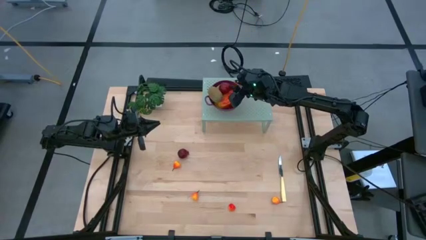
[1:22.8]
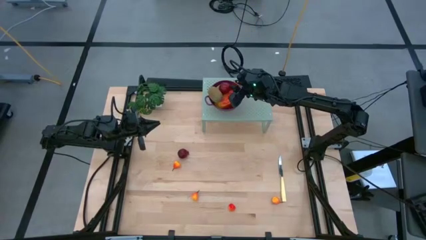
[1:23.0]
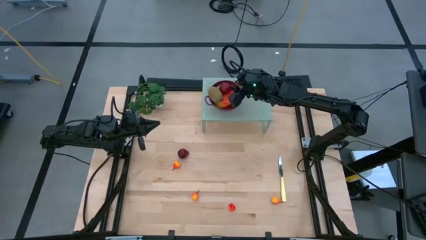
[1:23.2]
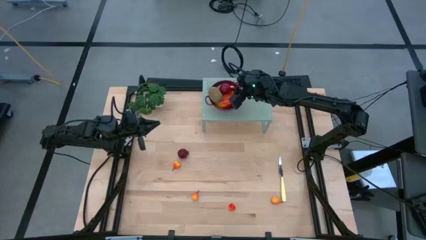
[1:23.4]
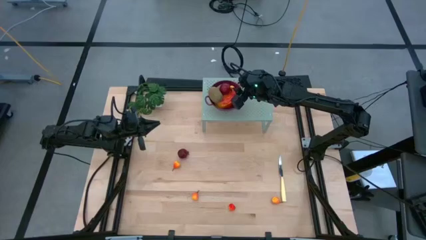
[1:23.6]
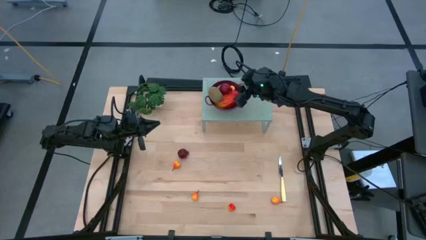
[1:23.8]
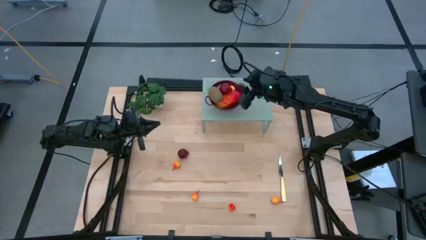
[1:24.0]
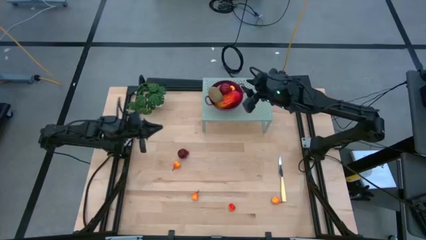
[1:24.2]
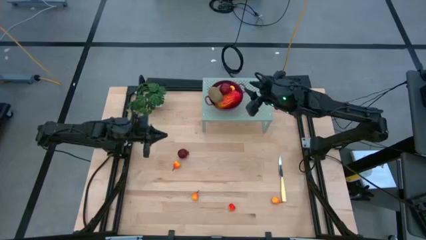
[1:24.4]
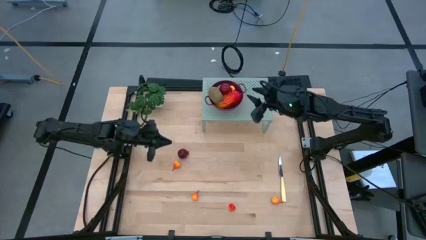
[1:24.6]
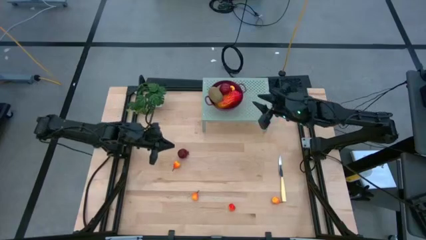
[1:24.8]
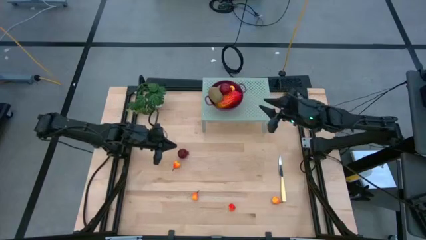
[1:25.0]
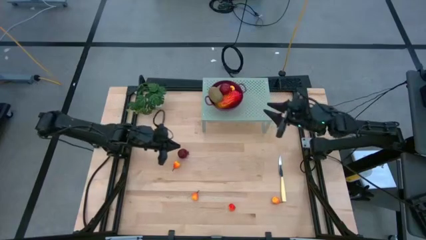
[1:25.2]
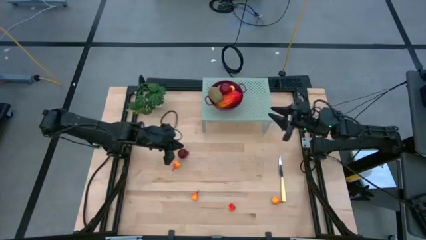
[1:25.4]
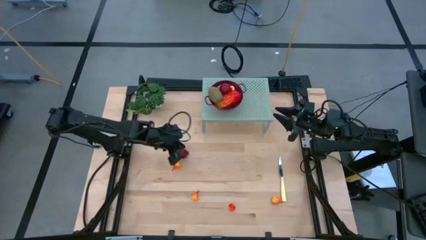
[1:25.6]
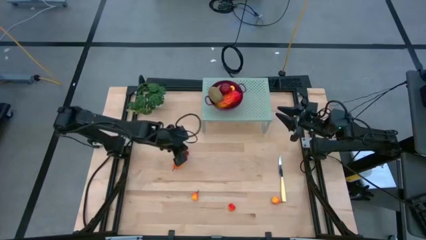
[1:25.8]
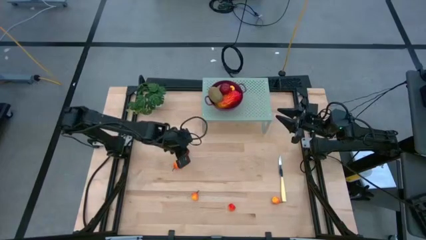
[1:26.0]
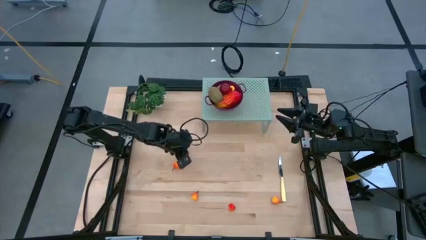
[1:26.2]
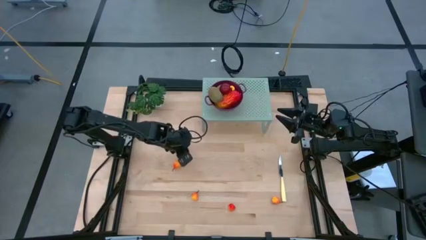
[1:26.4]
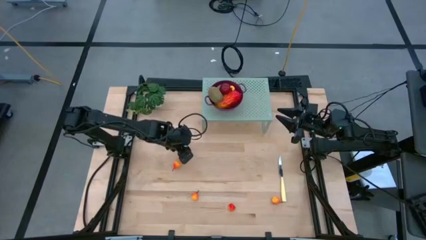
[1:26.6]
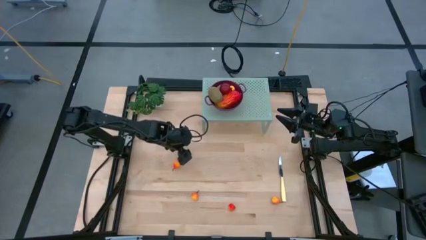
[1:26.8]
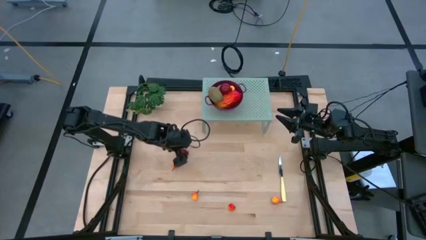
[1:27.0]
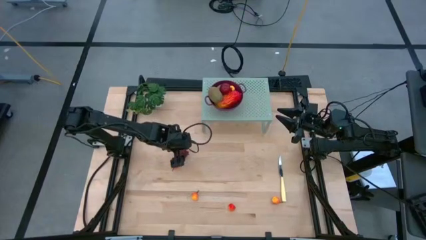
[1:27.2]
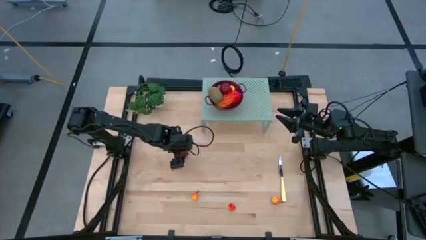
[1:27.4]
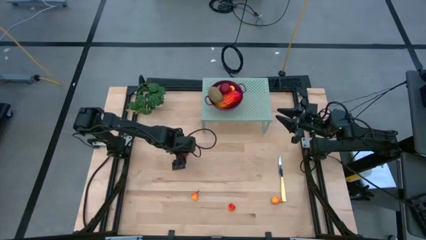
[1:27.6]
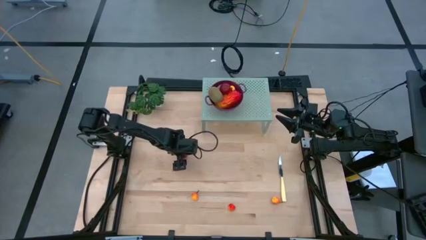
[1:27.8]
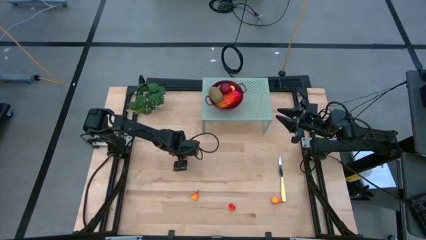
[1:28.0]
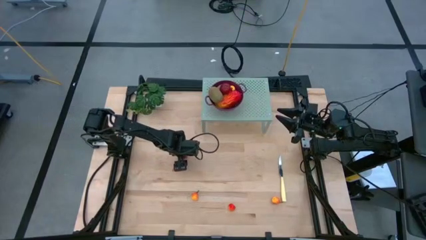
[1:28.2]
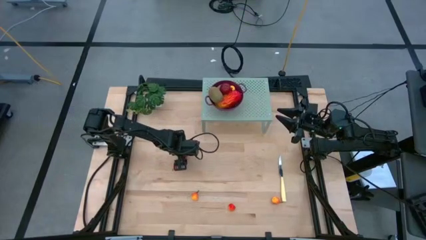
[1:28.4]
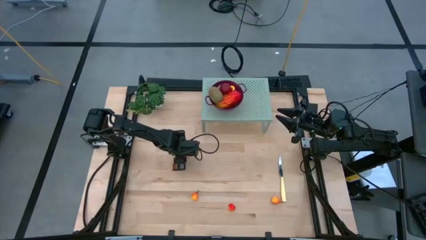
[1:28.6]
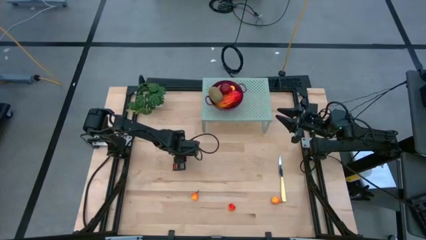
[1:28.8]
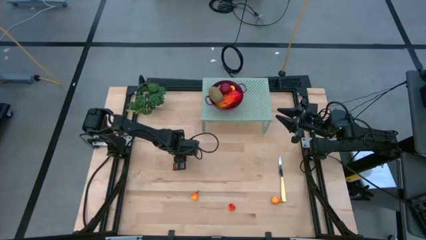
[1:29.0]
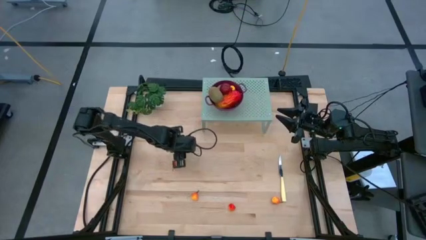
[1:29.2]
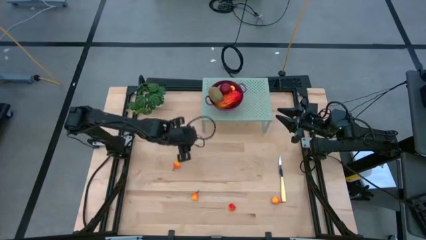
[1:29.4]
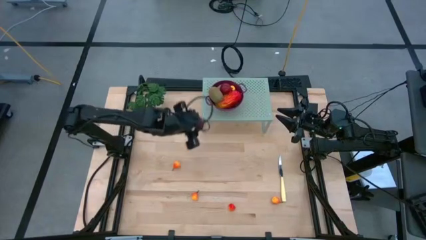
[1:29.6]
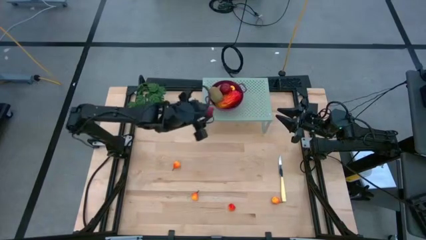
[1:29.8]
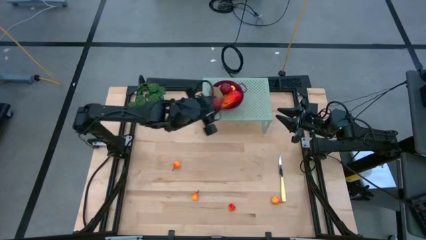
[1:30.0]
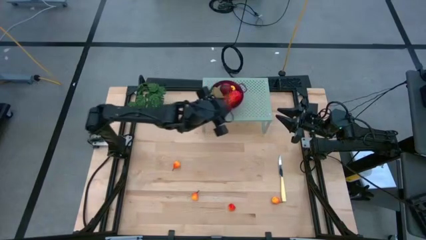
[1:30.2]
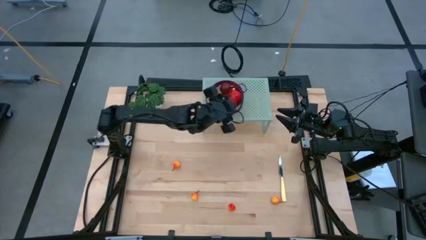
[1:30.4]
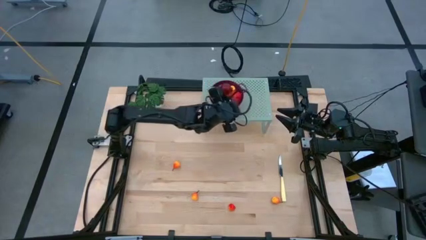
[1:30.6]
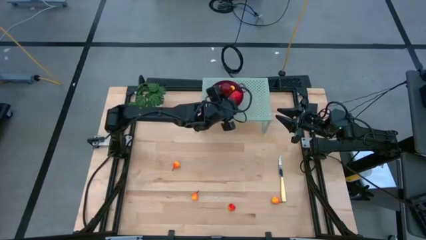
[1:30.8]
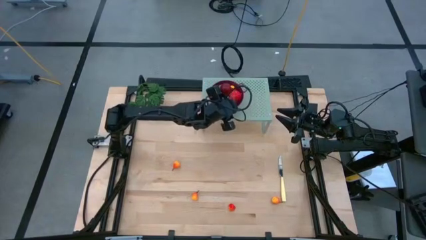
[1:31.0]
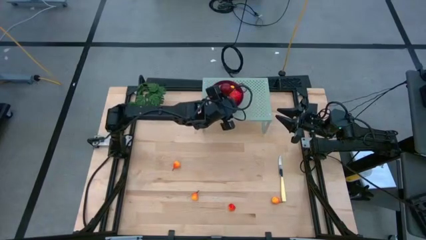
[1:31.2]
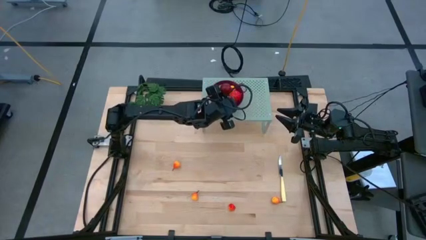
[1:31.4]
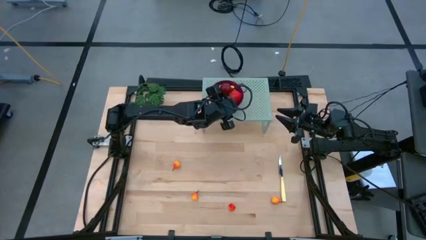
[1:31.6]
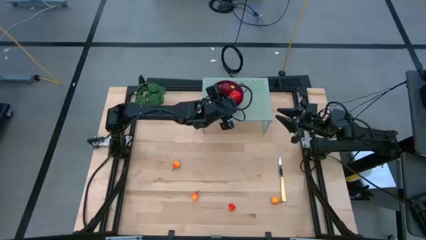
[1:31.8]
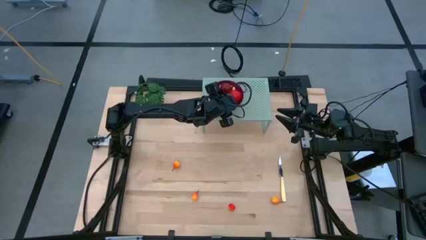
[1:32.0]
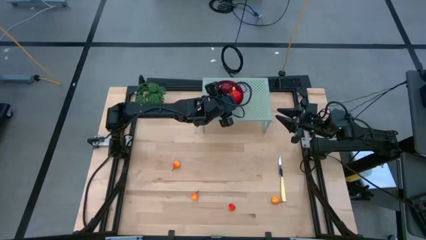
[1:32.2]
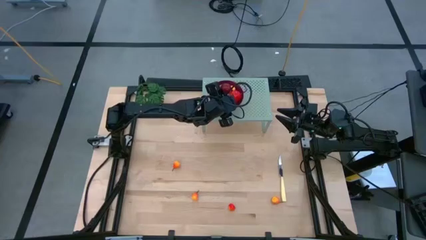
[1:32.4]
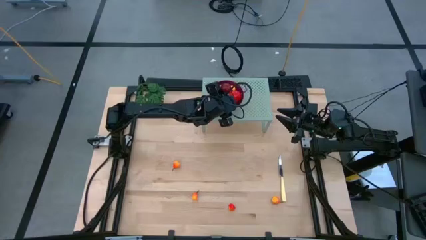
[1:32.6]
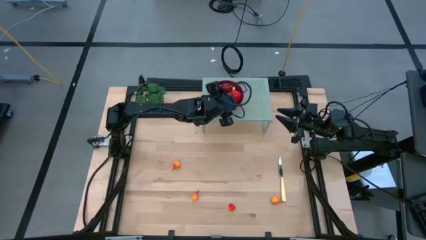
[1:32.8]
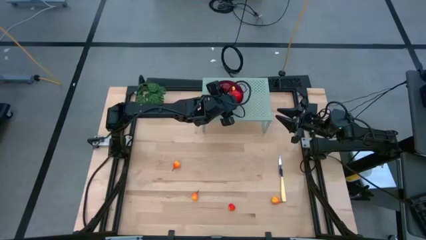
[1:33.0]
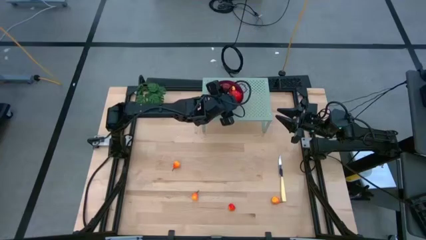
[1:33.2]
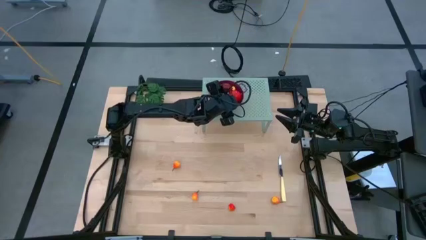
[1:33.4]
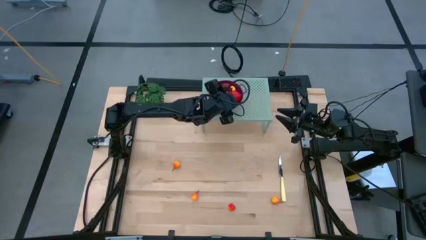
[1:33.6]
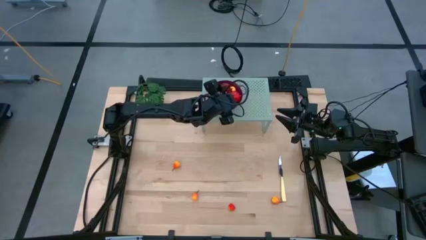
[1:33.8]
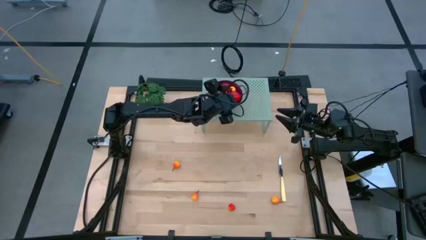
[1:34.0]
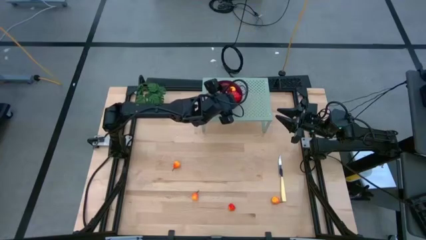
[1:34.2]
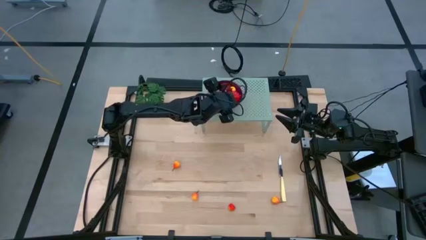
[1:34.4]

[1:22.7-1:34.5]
Task: Pick & Place Fruit
Put the pomegranate in the violet strainer bowl on the shelf

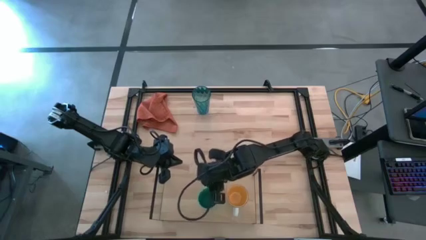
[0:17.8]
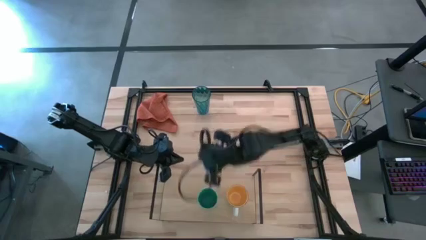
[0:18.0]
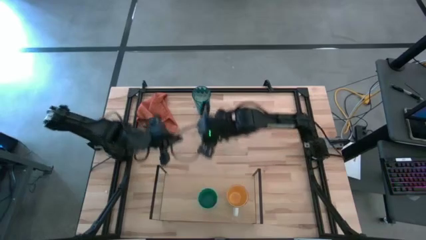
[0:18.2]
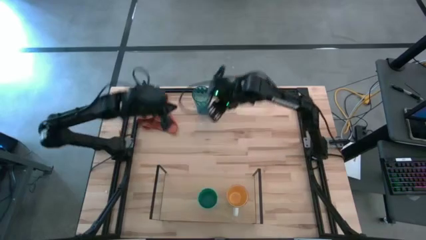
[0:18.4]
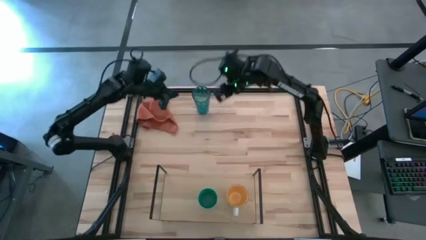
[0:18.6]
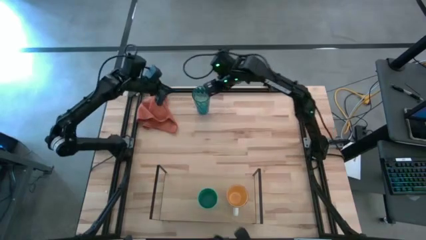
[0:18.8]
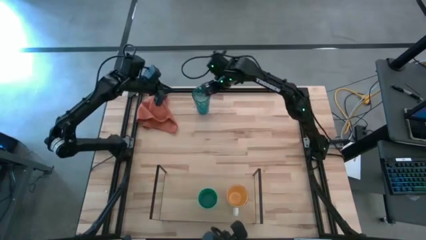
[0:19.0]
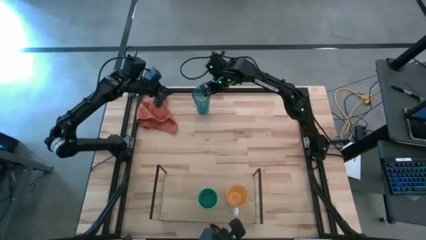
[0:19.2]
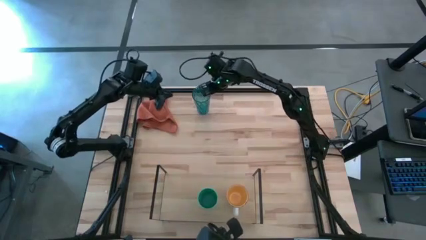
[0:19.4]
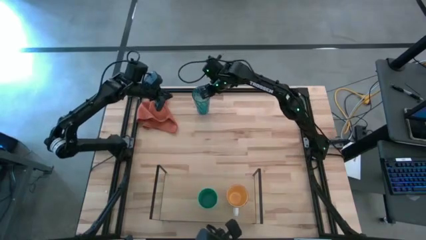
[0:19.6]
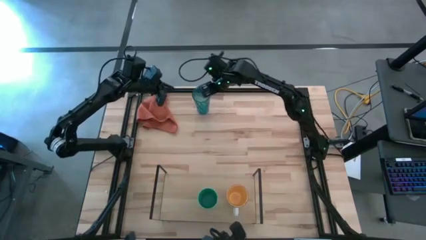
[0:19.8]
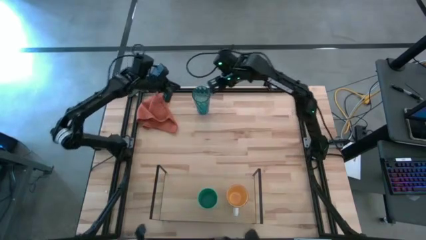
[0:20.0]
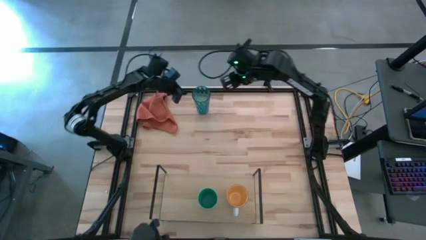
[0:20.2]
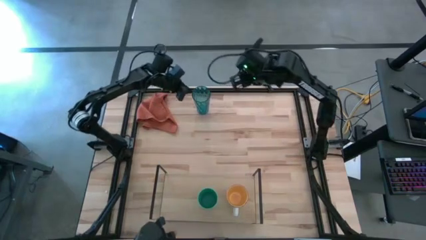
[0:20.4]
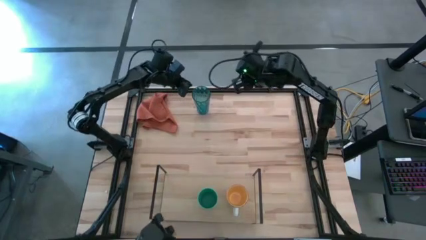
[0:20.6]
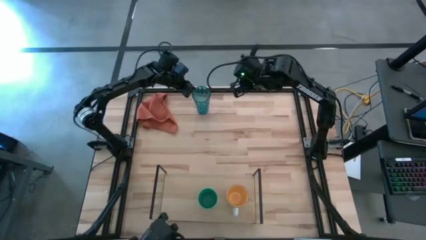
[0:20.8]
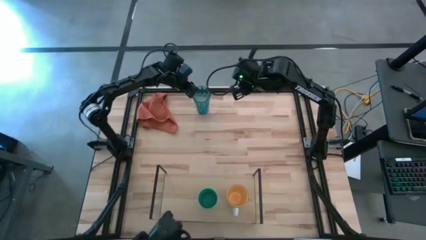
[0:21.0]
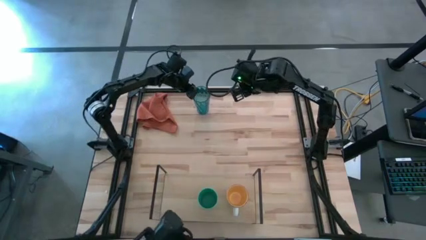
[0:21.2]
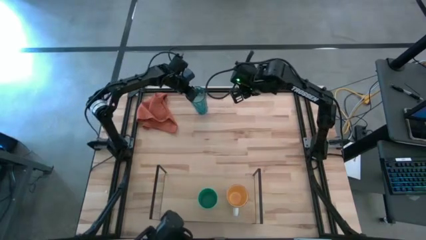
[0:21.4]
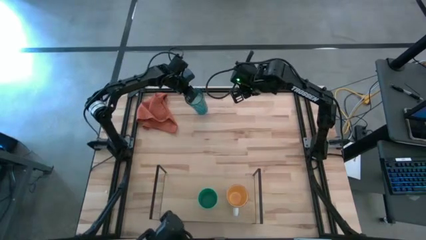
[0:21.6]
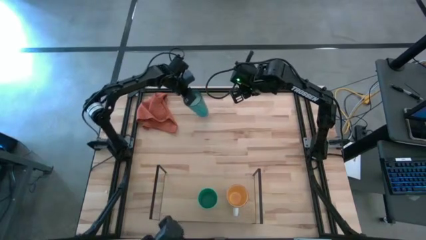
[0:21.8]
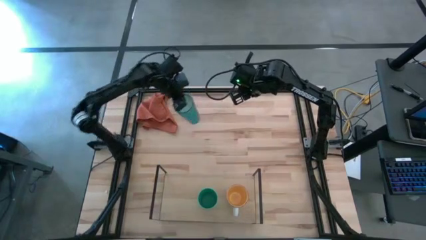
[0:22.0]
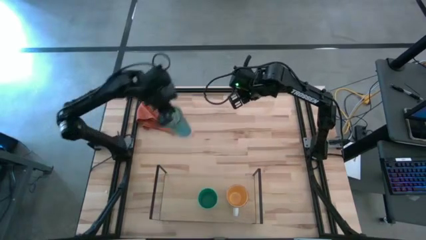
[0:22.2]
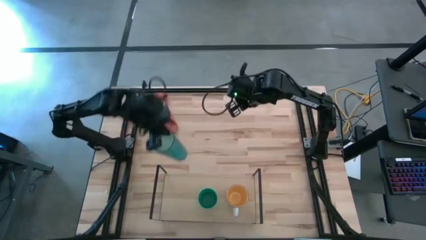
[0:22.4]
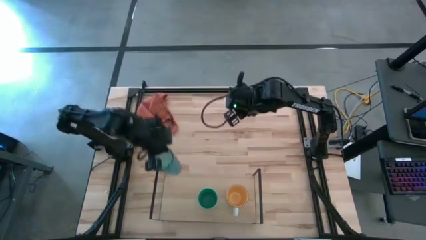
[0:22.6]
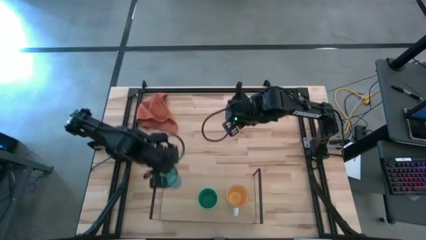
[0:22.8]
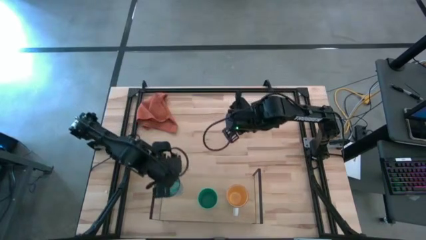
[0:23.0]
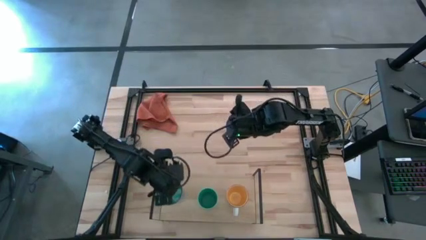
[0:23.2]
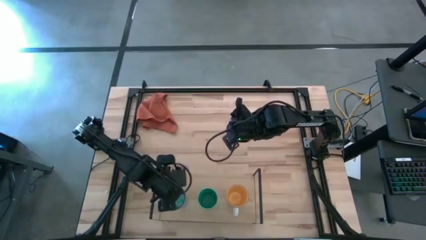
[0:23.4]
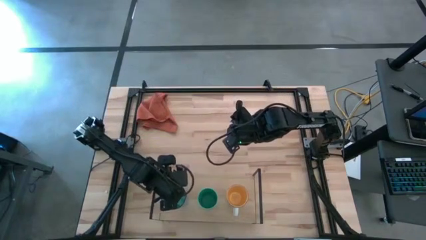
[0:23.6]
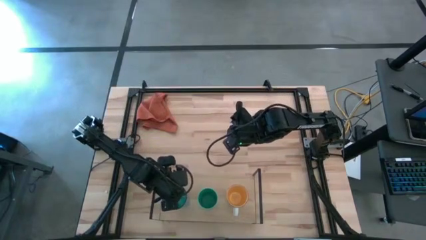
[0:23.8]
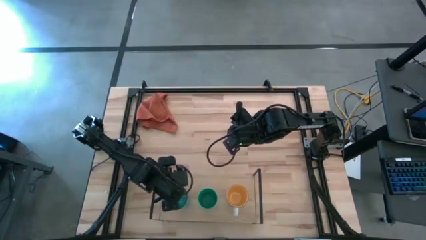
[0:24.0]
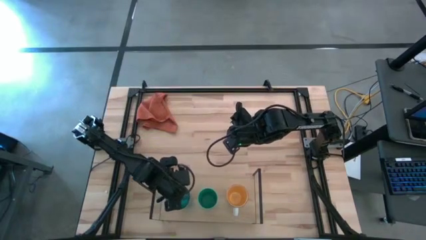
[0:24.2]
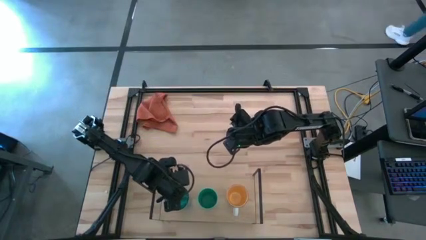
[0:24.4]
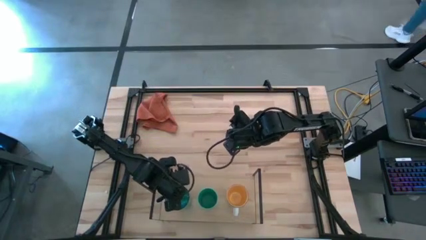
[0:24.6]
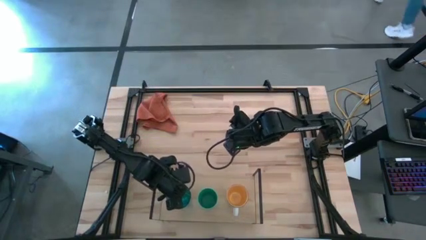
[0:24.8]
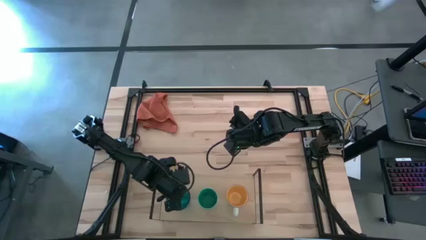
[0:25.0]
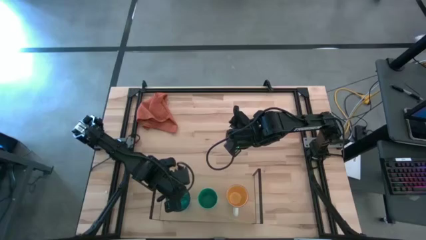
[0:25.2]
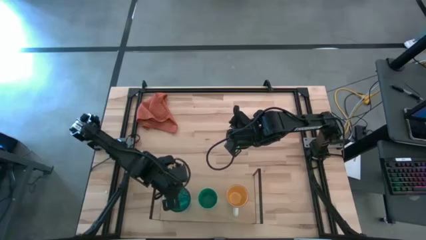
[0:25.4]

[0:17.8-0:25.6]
Task: Stack small to large cups/mugs on shelf
Put the blue glass on the shelf
